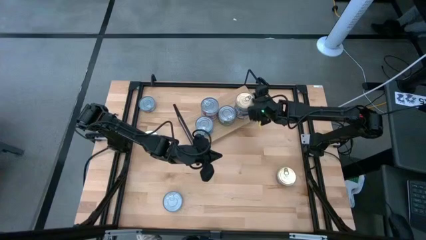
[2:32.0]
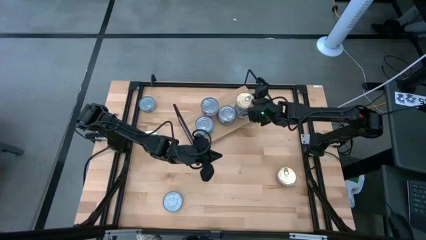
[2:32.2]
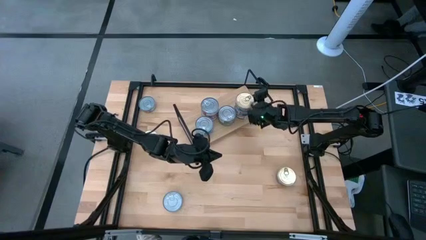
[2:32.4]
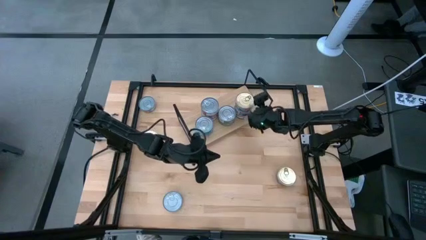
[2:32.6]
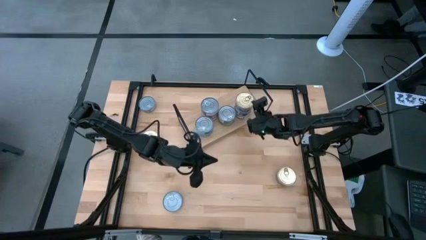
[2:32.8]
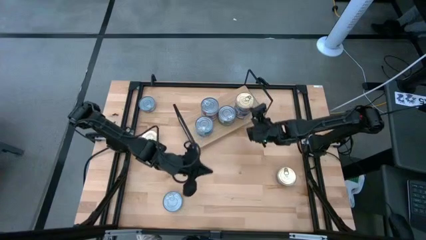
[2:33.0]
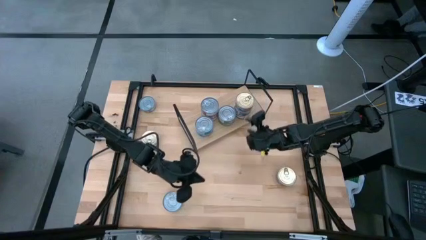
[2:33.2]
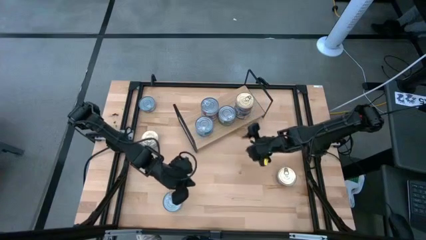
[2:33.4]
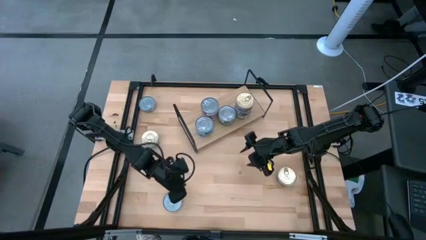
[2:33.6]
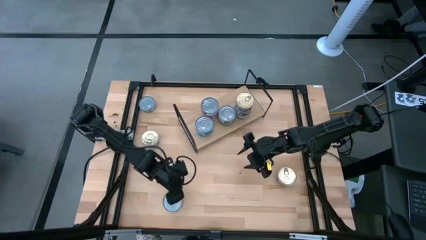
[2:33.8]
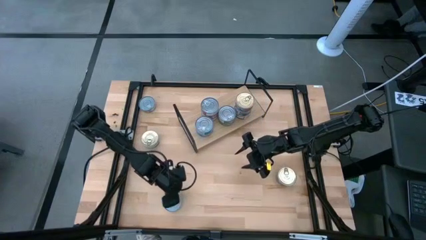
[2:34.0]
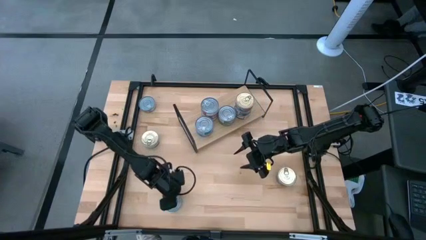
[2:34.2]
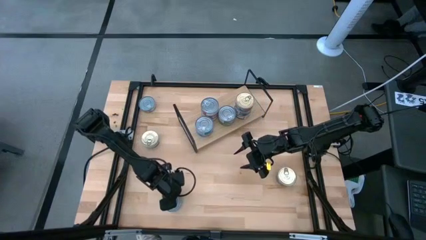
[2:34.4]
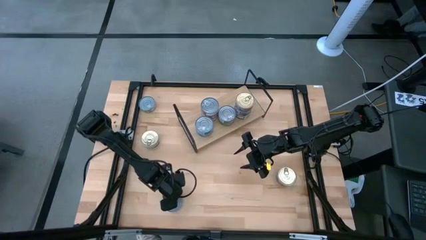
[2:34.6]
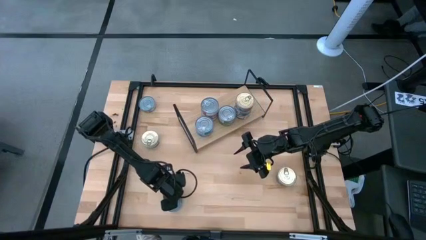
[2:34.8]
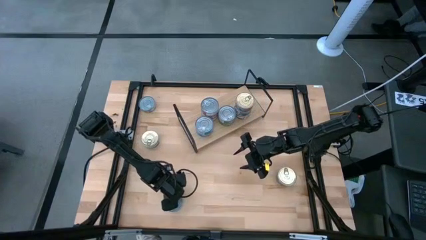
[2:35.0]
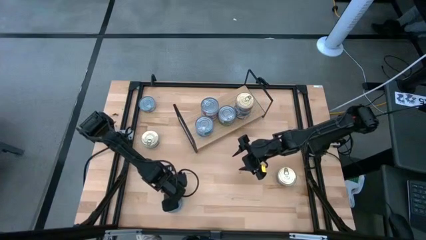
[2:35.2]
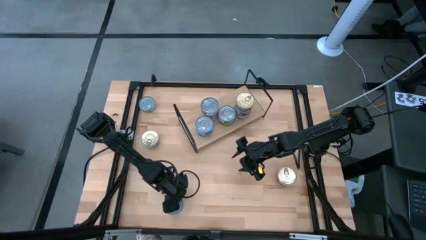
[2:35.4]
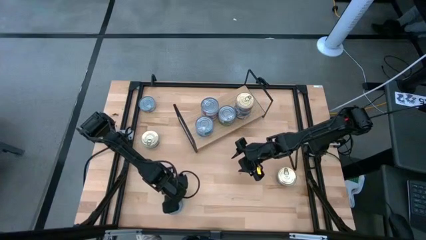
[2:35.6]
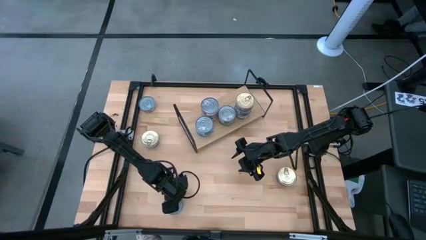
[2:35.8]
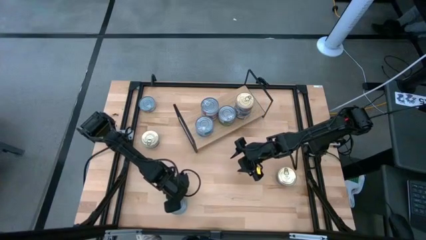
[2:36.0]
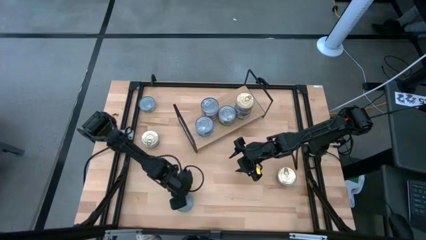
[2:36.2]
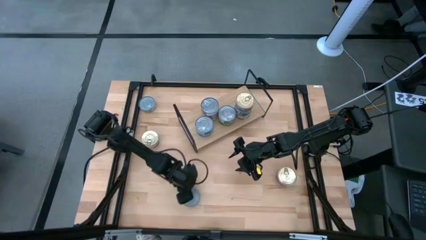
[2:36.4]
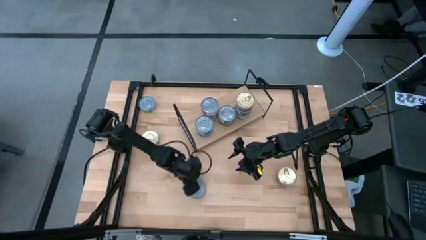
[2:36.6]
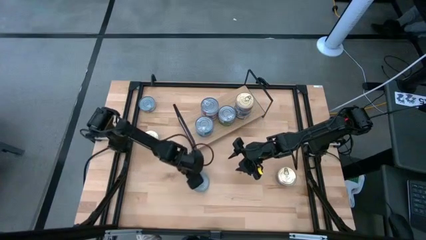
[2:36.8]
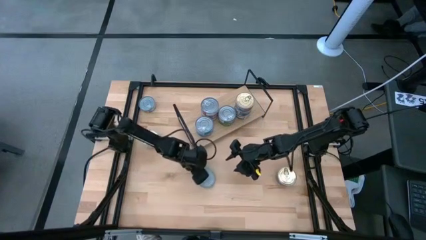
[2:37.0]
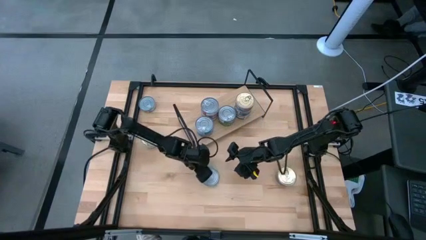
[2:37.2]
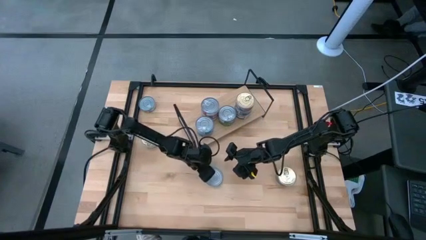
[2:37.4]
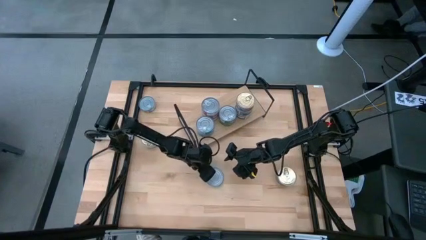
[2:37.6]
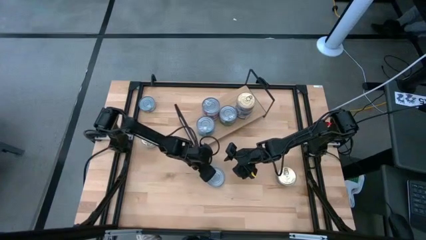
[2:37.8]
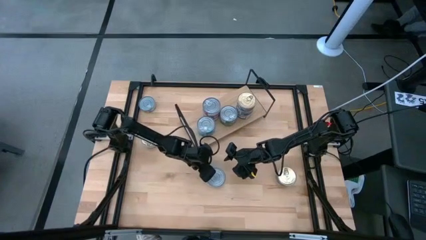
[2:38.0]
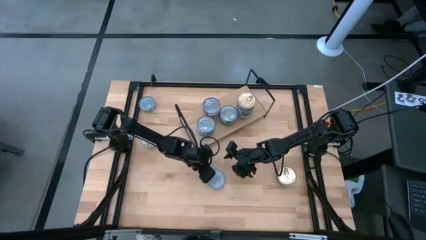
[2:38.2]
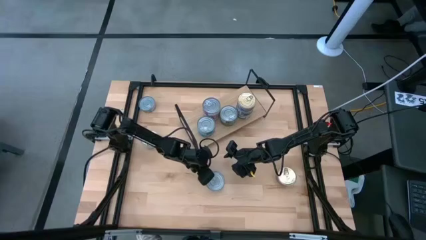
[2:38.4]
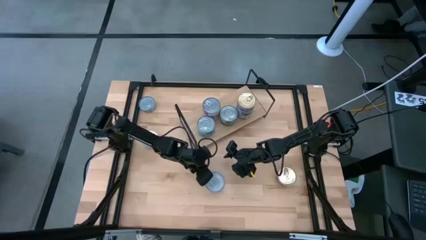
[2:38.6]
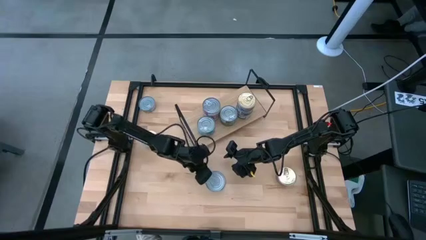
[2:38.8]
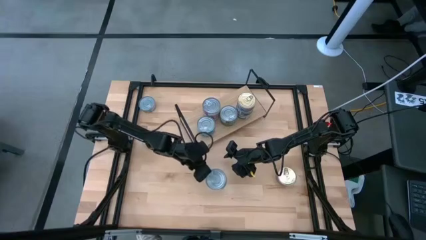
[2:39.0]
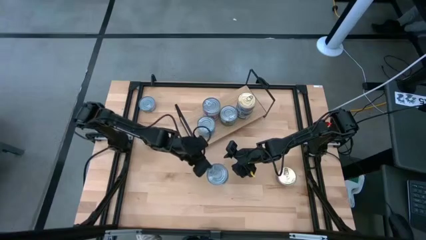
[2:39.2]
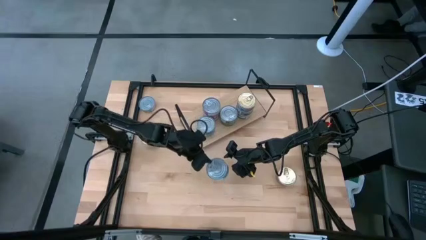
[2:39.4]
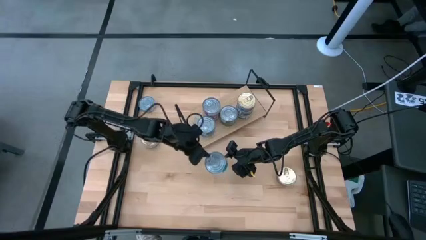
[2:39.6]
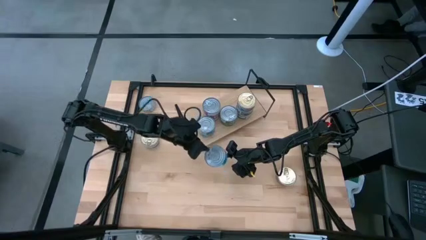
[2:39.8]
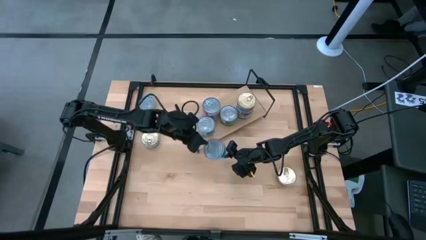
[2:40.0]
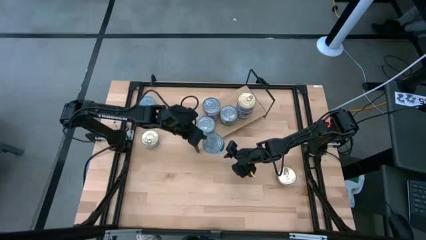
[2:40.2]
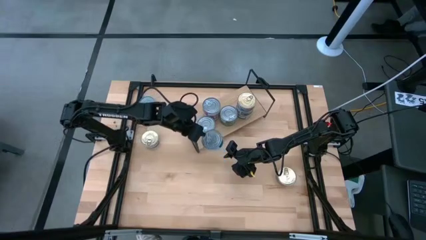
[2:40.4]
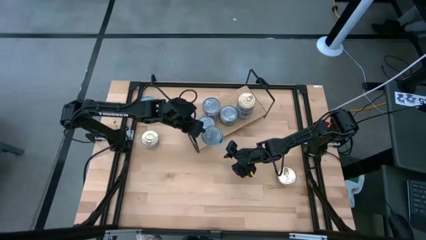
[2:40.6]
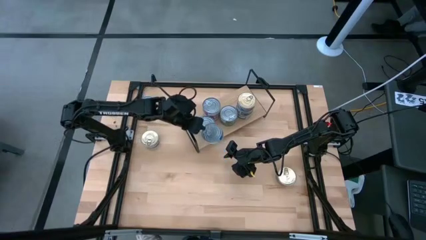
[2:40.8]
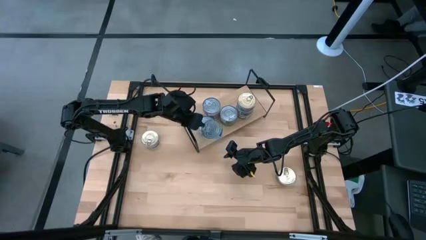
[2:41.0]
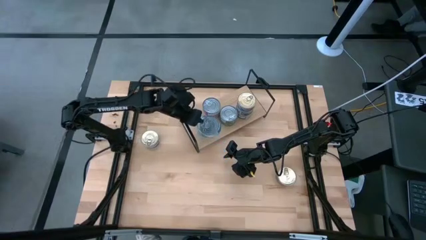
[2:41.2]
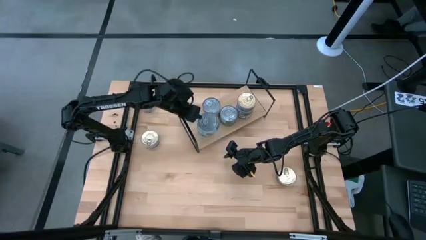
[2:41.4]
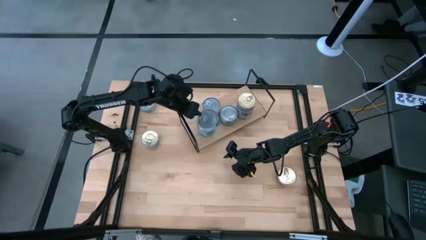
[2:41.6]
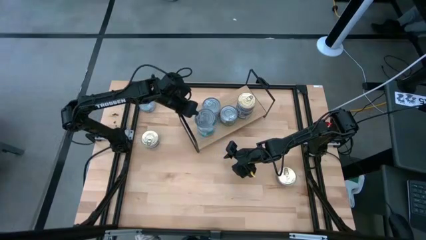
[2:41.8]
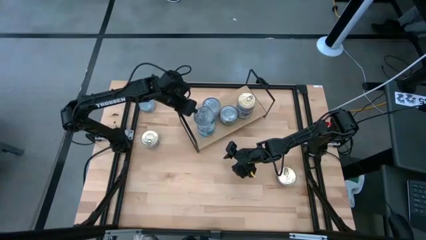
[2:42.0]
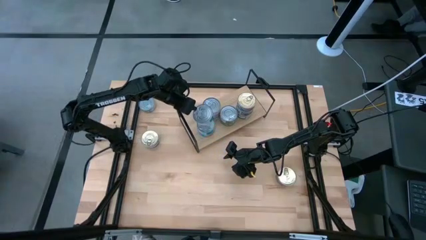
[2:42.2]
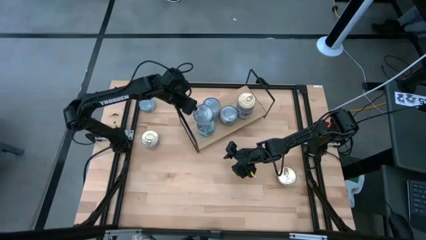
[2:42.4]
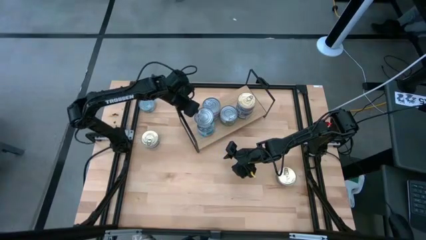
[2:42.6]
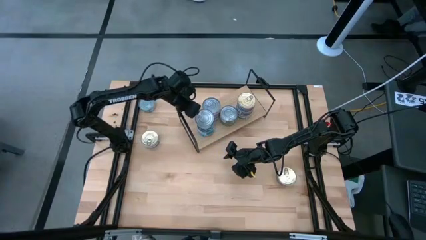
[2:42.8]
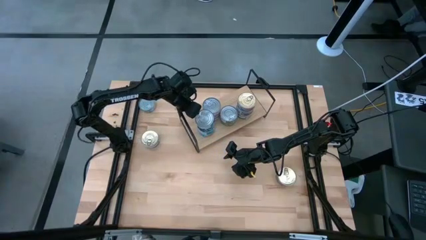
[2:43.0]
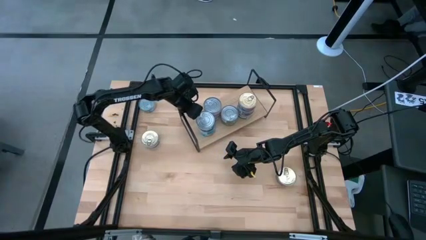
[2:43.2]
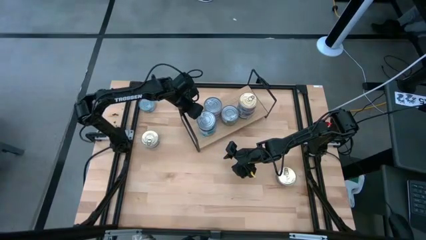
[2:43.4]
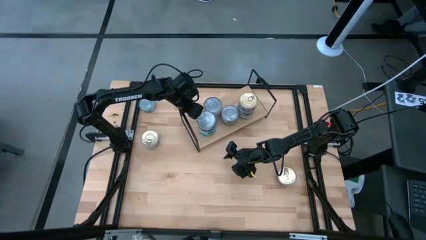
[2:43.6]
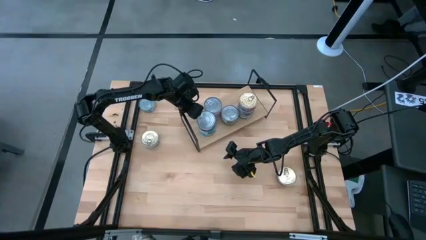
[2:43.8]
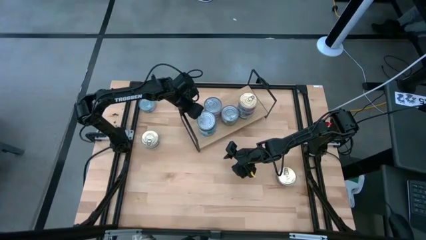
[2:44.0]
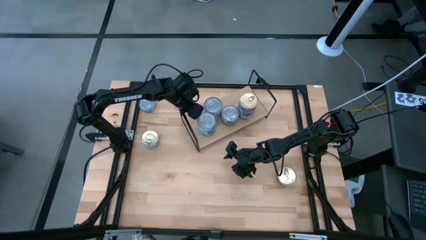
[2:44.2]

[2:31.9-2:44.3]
Task: Stack canned seafood by type on shelf
Stack the yellow and blue tuna can on the shelf on top of the other yellow and blue tuna can

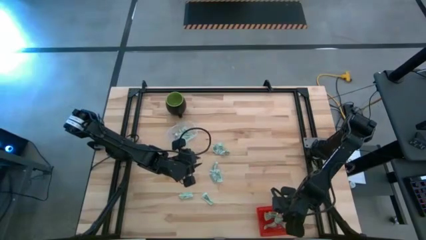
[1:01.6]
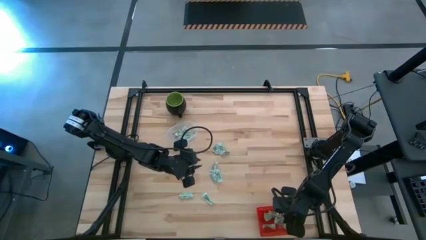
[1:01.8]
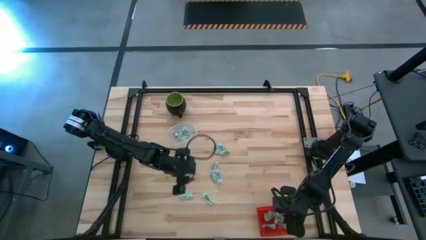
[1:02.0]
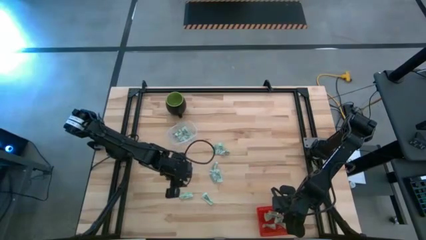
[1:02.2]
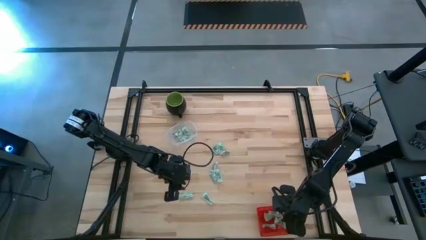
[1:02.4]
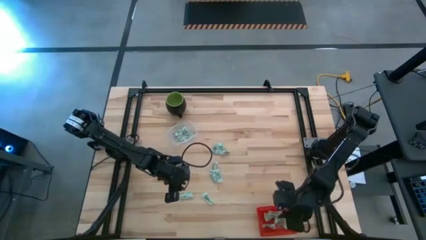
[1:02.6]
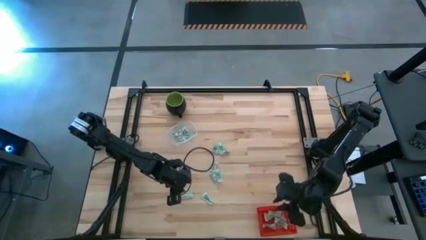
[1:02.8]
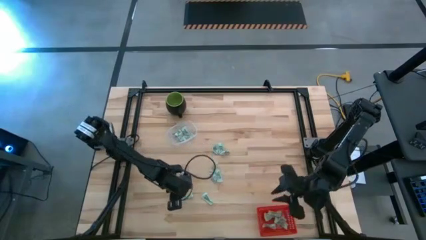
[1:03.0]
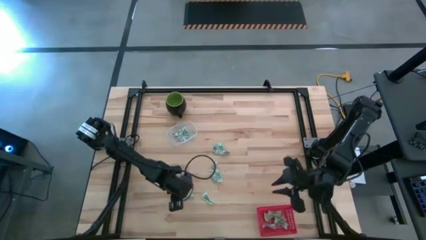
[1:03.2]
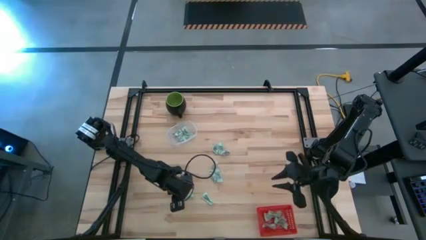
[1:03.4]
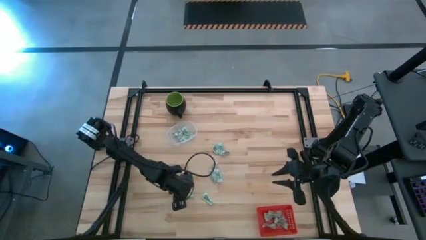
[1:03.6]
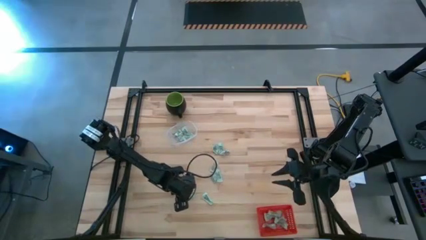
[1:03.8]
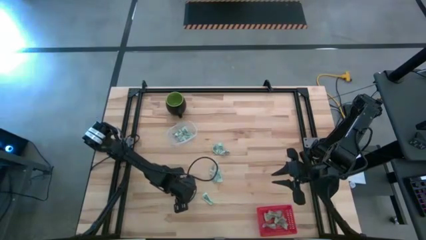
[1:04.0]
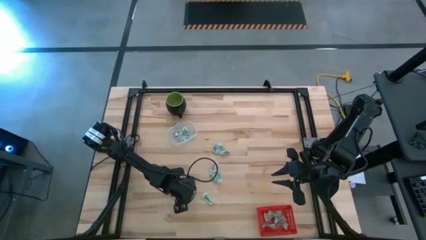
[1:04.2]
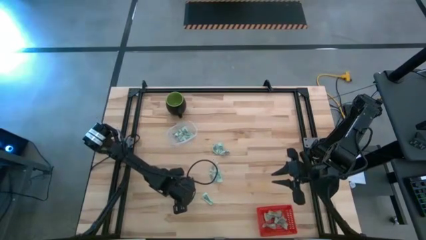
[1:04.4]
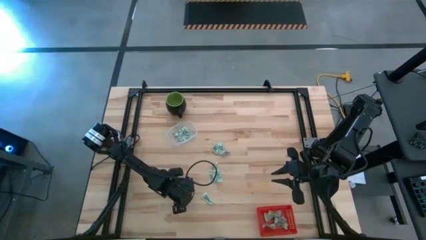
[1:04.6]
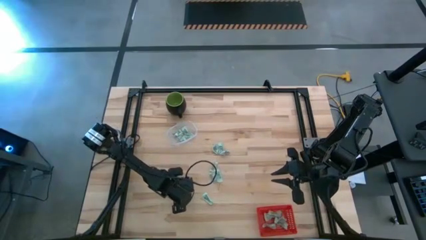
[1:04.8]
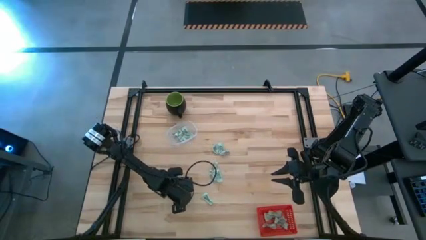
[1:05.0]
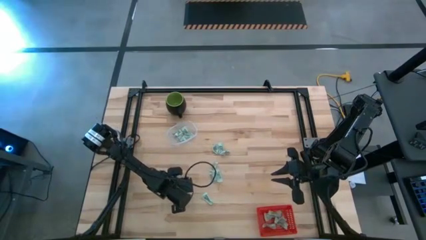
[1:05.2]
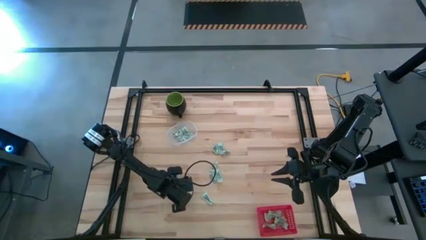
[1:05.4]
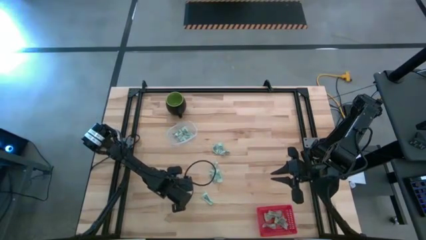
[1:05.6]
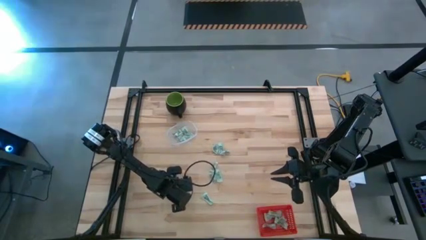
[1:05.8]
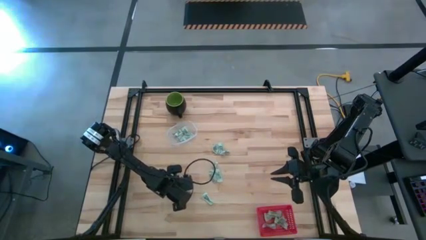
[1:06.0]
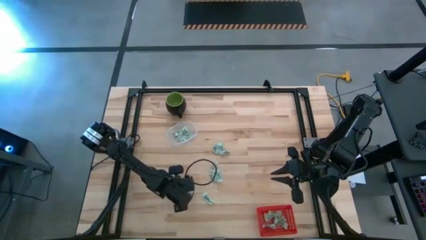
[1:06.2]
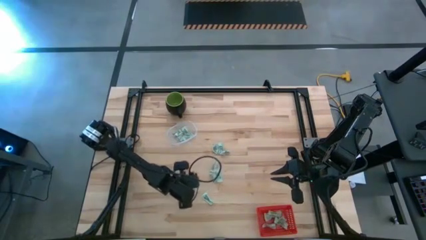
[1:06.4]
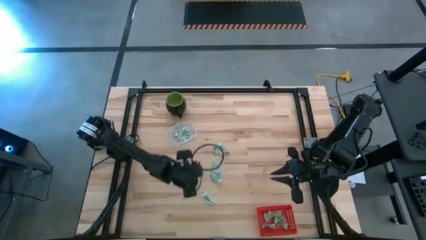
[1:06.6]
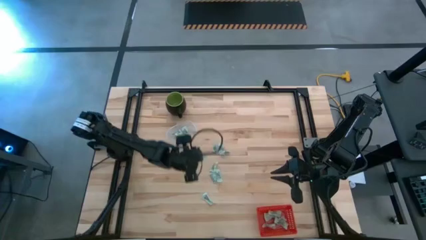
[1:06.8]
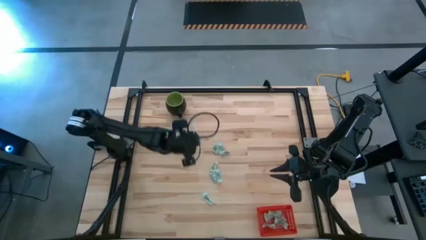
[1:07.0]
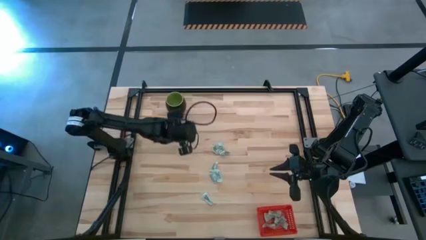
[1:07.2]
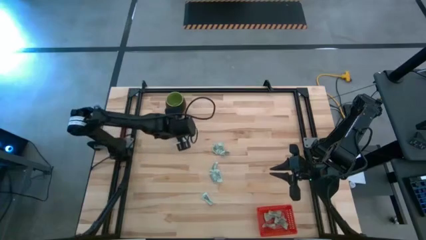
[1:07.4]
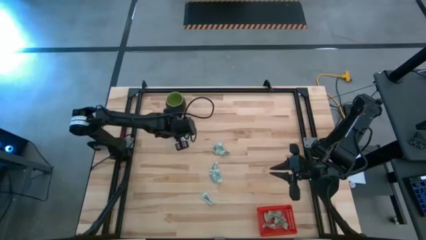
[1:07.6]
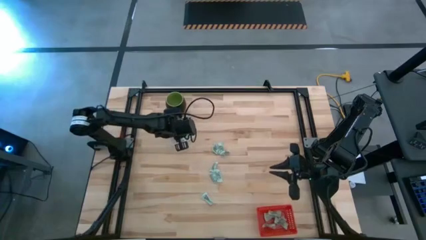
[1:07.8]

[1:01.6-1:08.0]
Task: Pick and place items into bin
Put the green stevia packet into the transparent bin
